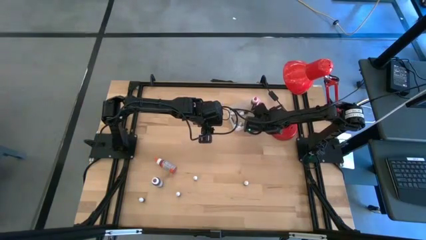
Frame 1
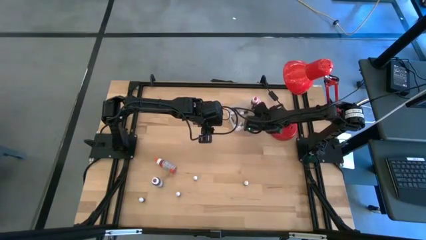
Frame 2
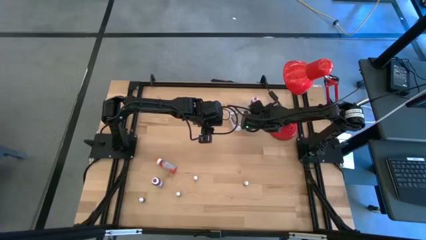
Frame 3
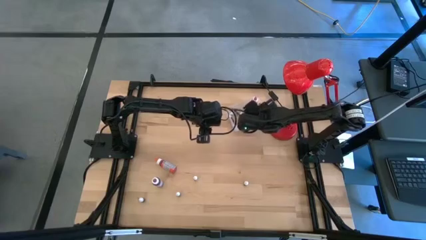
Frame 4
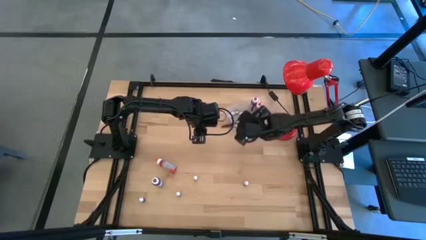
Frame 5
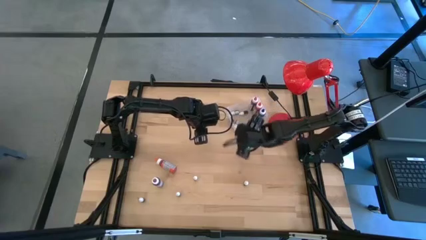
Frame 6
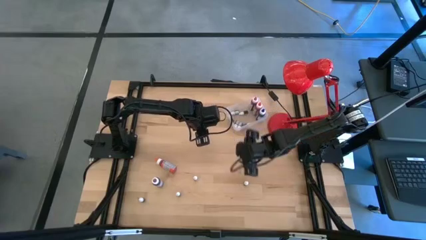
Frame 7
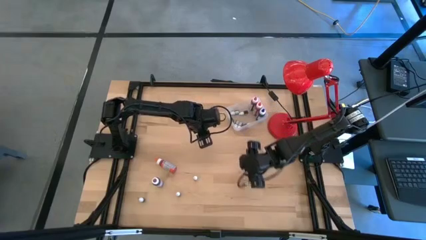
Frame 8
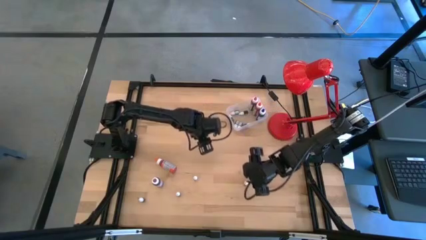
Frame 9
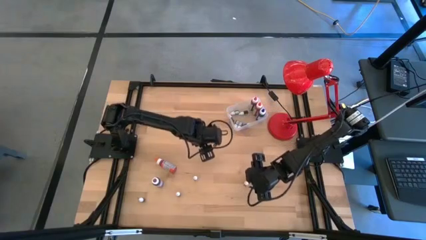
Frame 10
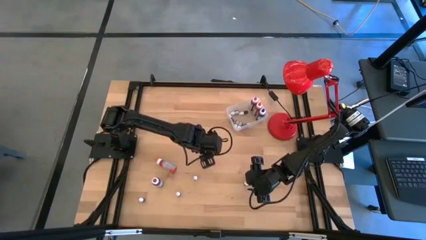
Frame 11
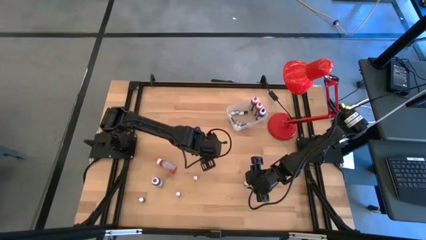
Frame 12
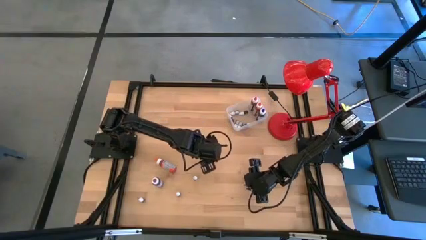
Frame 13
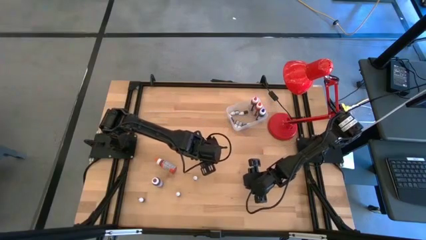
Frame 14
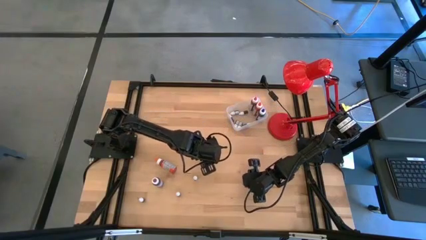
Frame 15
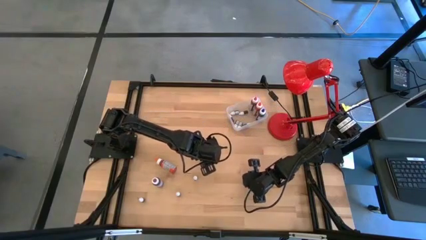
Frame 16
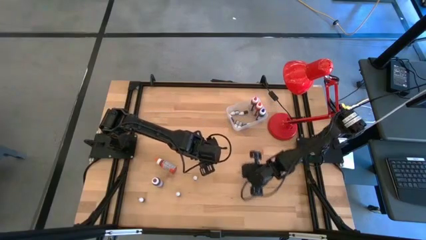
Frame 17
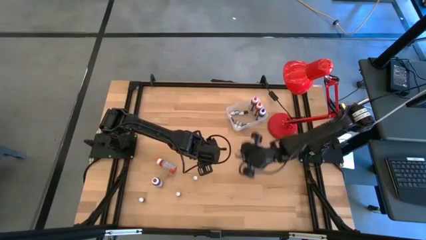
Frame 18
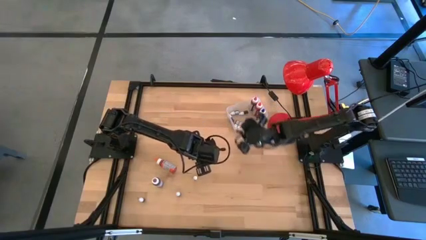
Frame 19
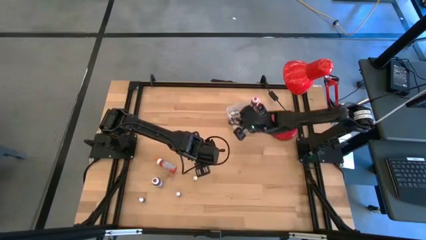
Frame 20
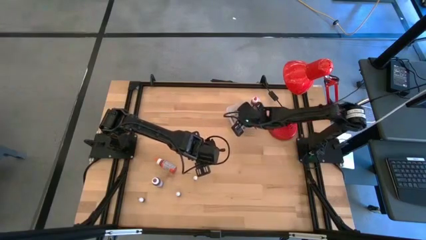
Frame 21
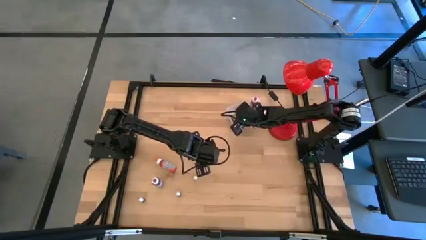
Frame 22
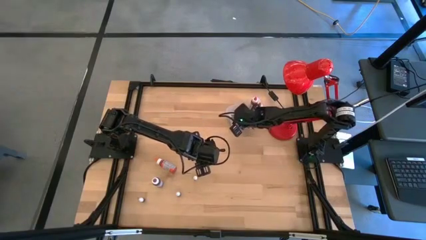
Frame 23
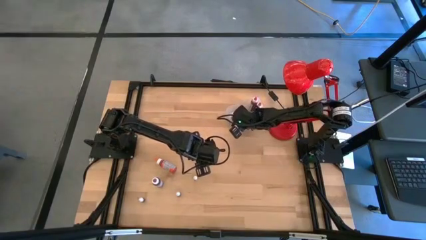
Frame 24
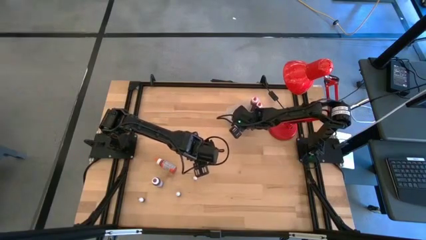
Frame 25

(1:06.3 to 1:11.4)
Task: Pick & Place food coloring
Put the small red food coloring bottle in the transparent bin

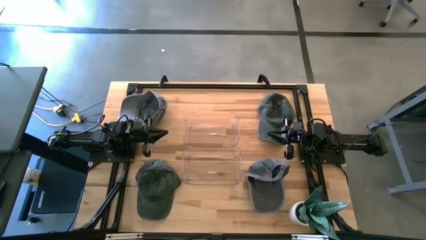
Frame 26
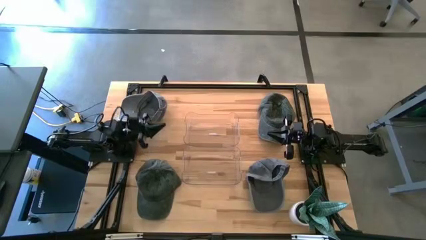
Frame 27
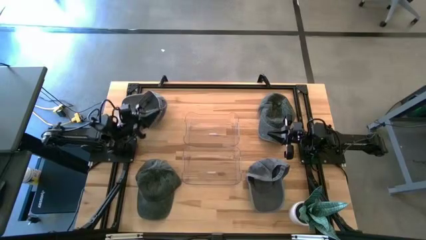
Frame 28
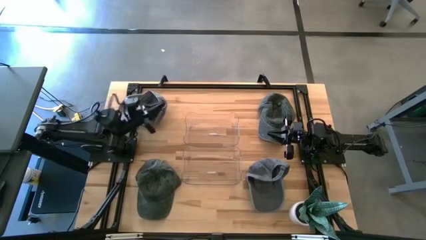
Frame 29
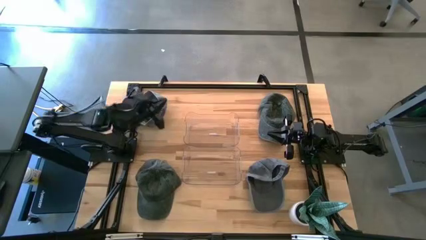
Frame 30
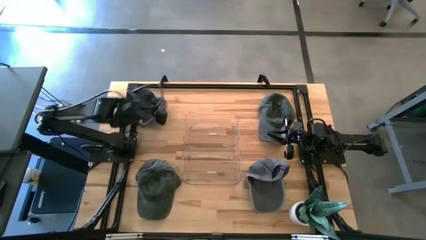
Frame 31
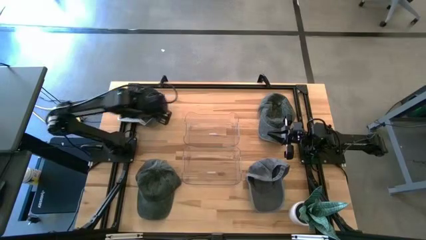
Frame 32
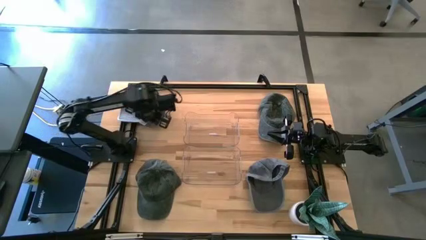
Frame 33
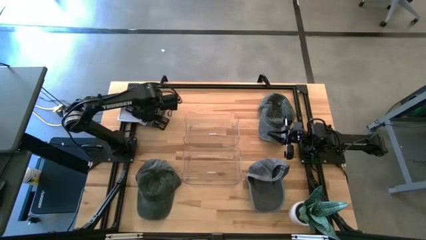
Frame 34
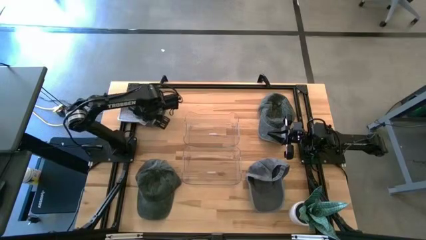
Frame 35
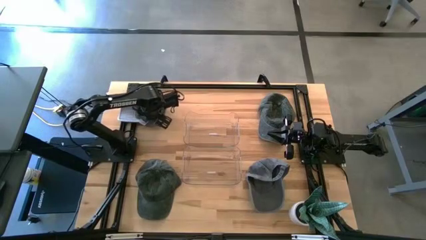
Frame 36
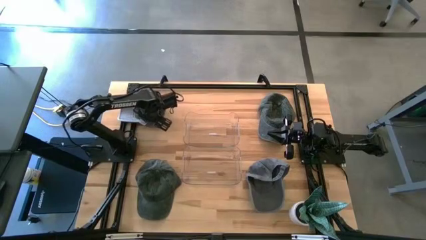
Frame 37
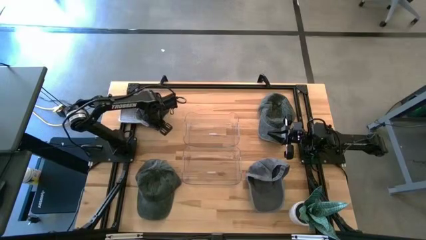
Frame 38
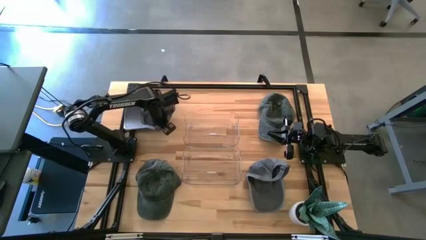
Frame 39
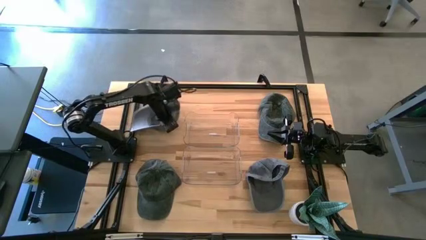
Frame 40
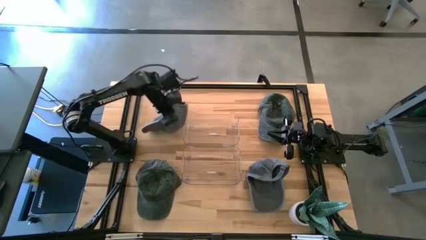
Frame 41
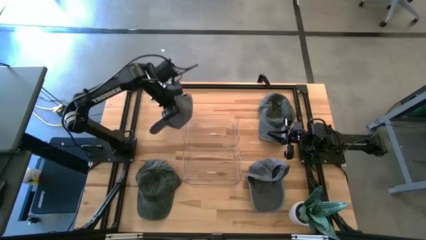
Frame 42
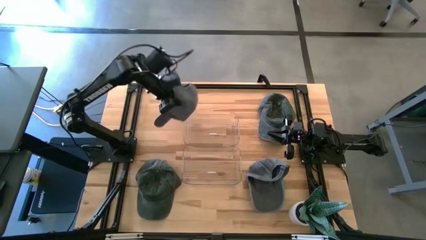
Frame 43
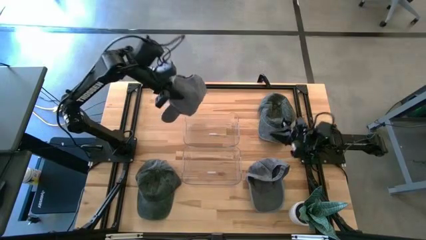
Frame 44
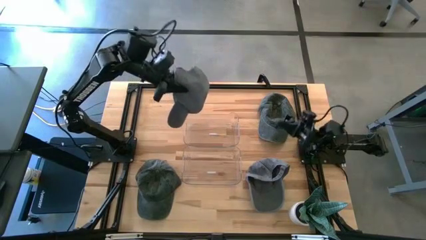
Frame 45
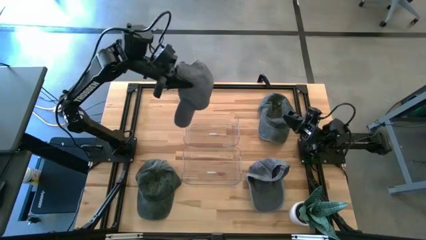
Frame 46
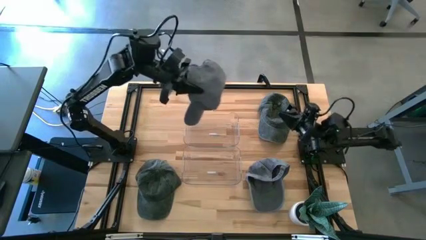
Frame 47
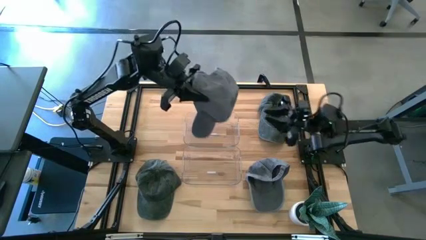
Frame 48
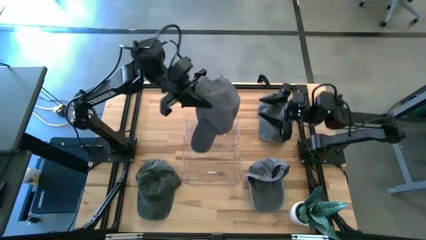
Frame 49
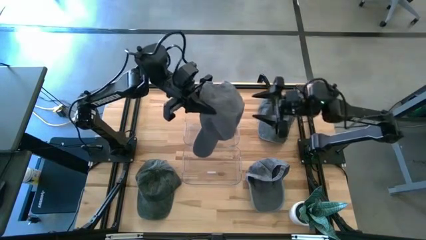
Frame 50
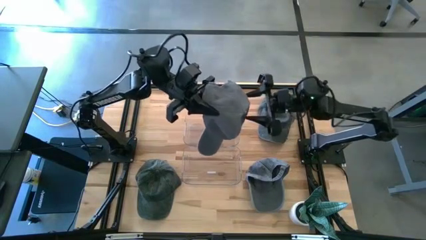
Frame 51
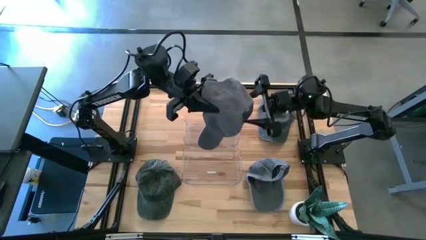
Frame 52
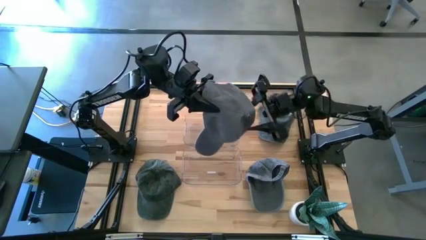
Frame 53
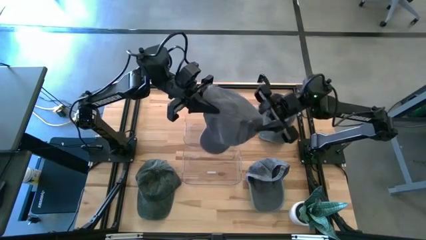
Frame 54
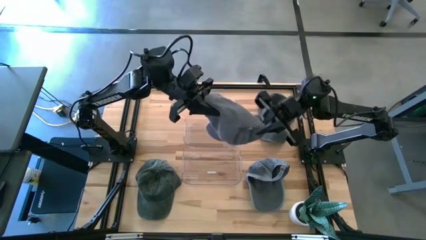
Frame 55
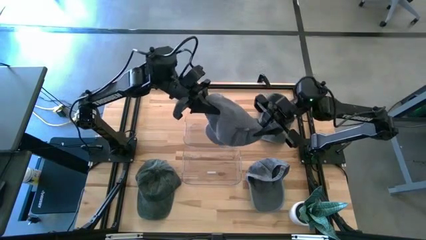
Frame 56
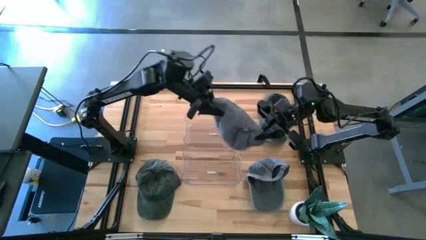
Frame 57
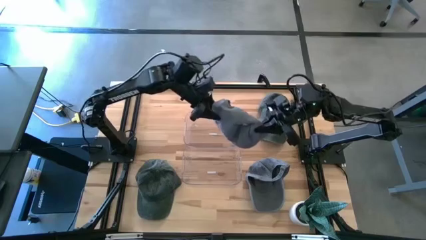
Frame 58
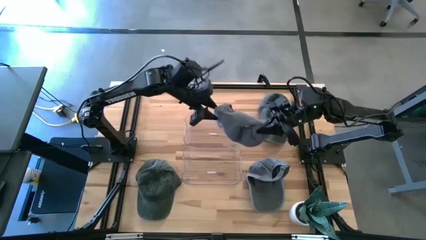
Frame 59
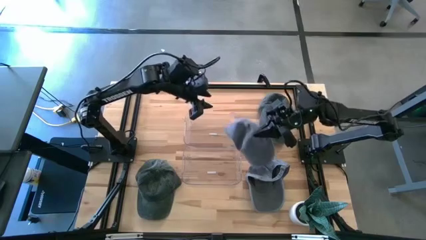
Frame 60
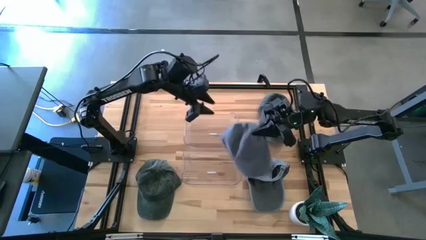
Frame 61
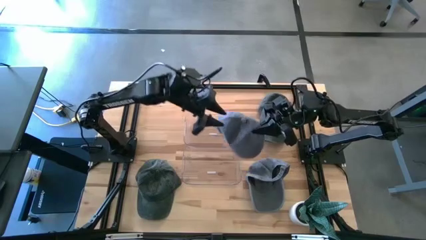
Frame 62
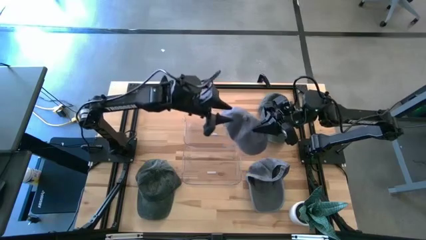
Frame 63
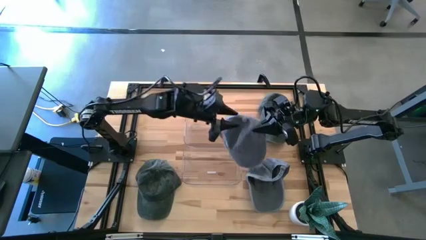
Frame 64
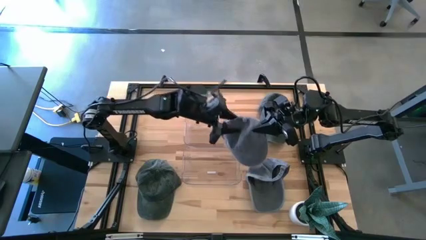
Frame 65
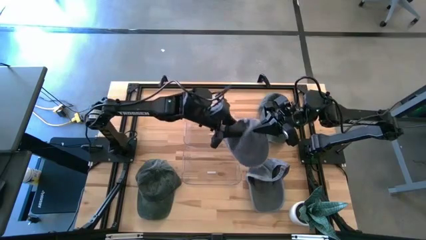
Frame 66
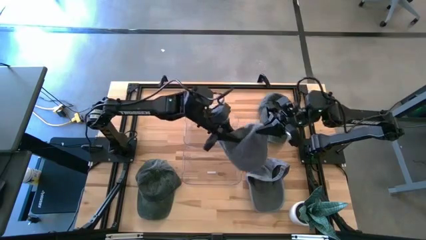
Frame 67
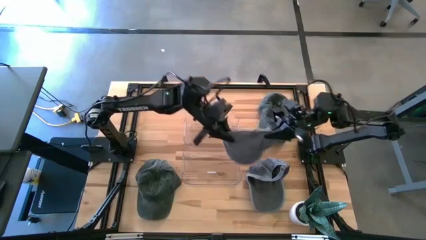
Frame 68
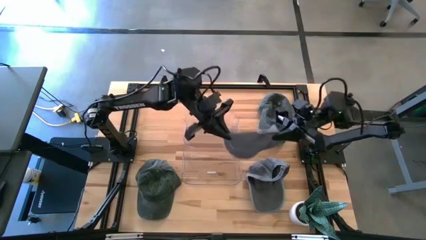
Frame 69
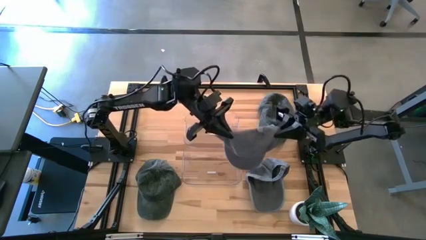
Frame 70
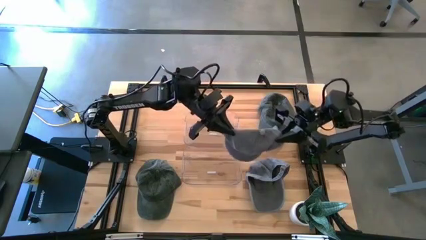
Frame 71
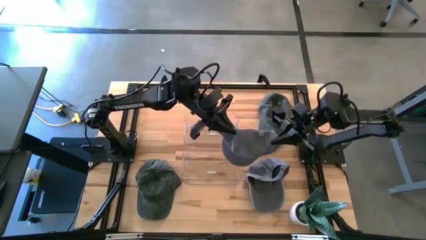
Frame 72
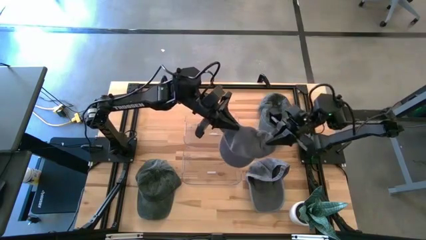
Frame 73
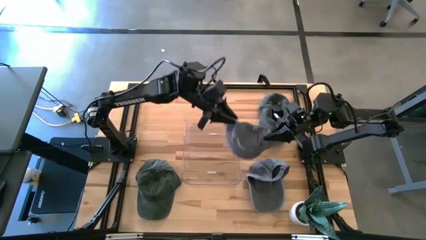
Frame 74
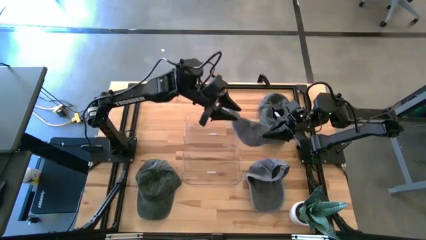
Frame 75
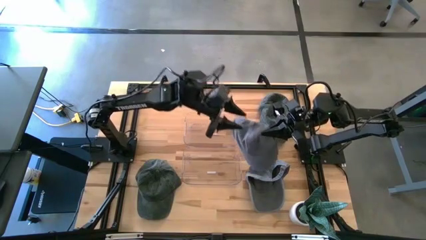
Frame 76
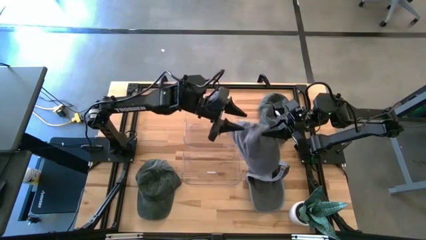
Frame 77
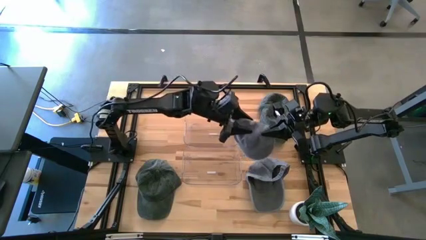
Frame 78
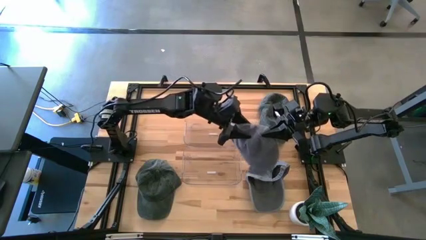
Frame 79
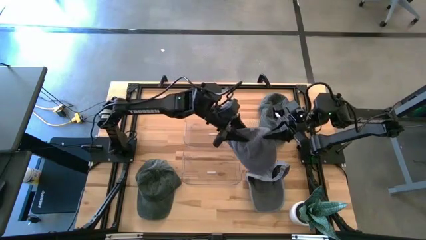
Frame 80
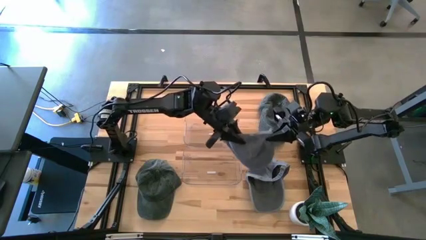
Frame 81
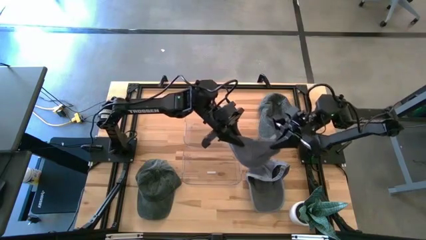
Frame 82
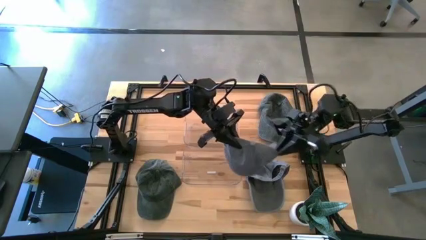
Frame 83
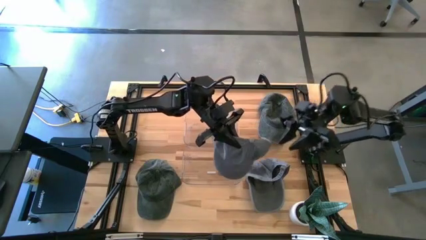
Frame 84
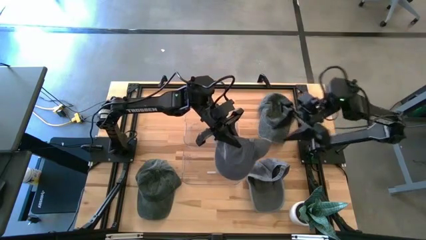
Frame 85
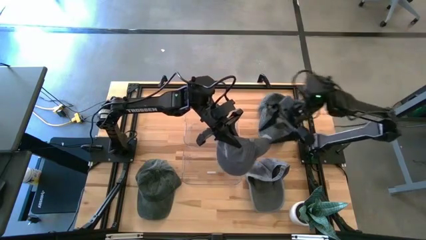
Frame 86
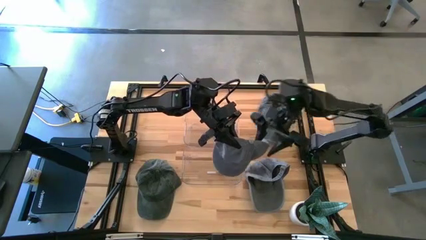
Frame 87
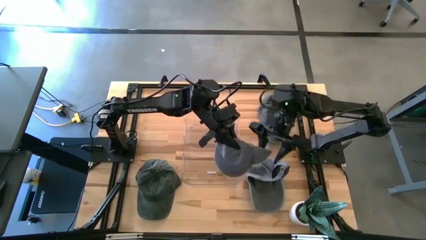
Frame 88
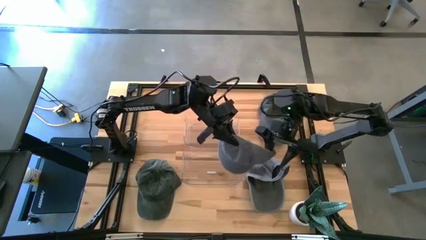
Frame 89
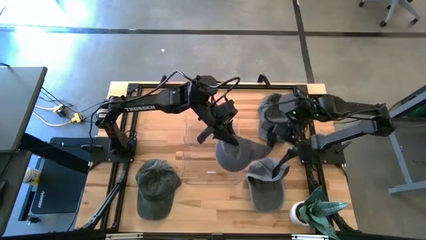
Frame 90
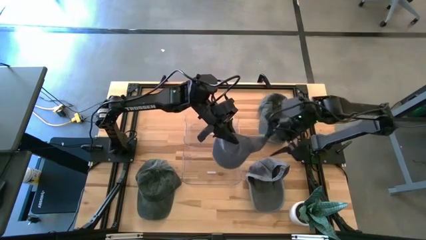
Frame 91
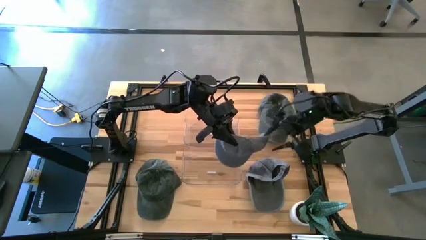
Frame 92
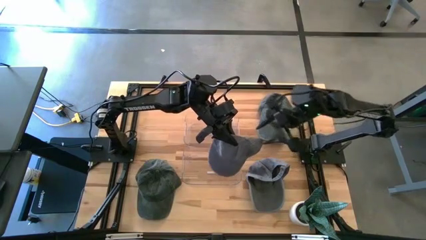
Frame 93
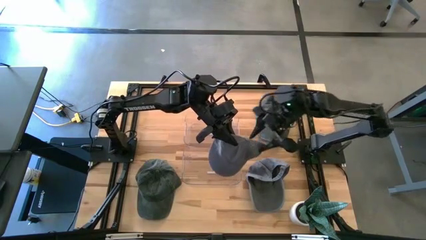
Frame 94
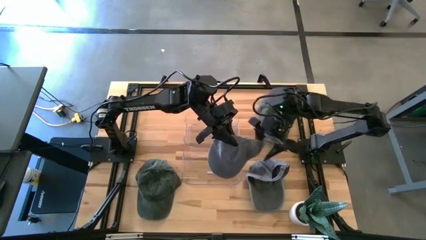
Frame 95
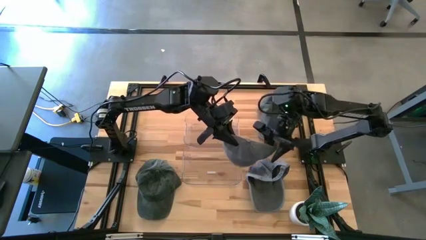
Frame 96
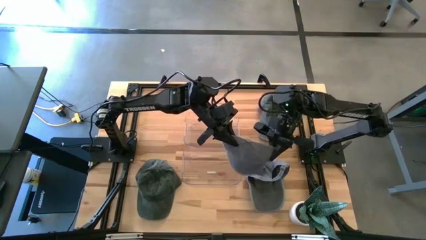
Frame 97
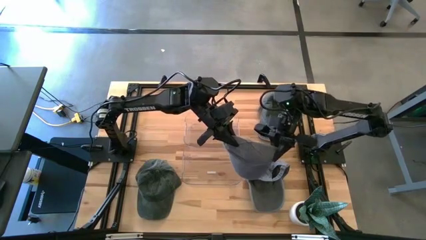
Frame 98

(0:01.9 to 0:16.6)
Task: Pick & Place hat
Put the top gray cap into the top transparent bin
